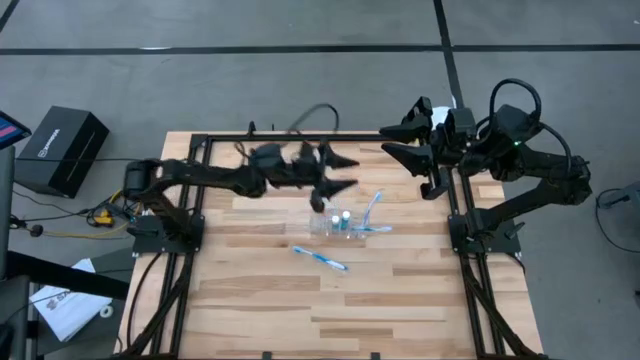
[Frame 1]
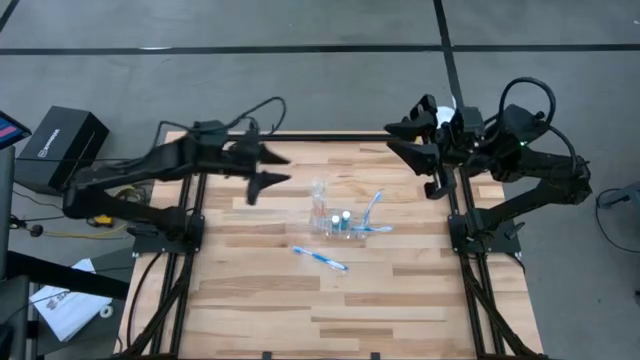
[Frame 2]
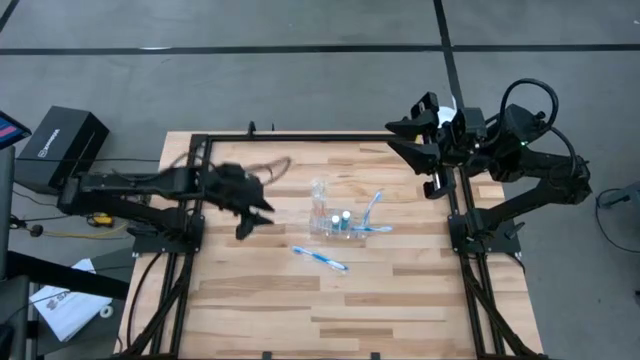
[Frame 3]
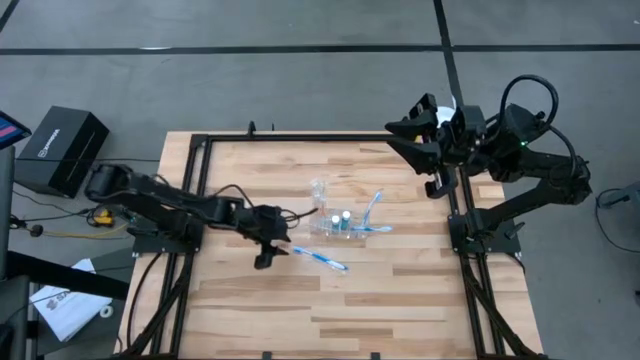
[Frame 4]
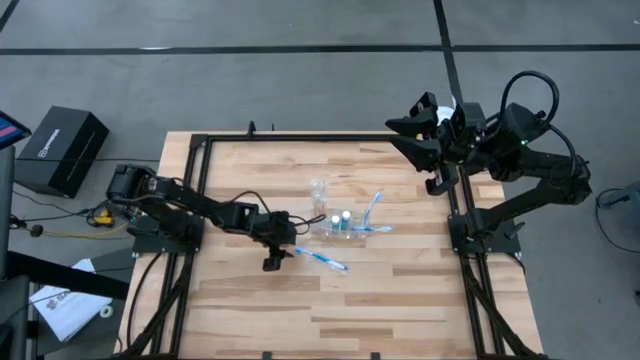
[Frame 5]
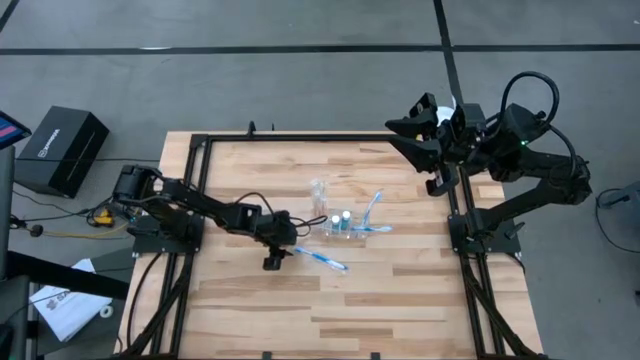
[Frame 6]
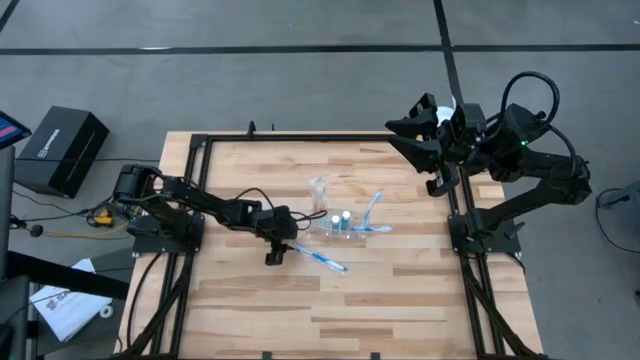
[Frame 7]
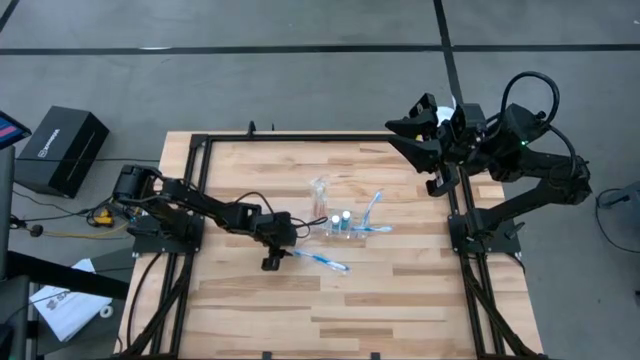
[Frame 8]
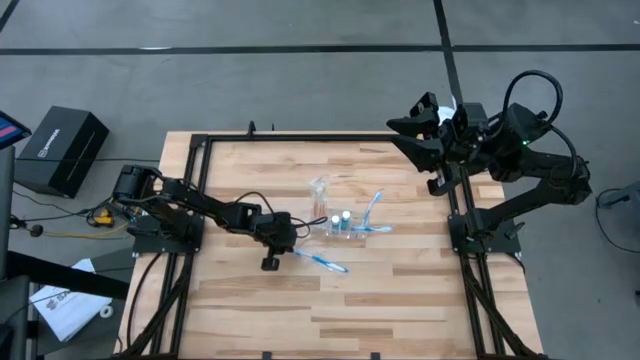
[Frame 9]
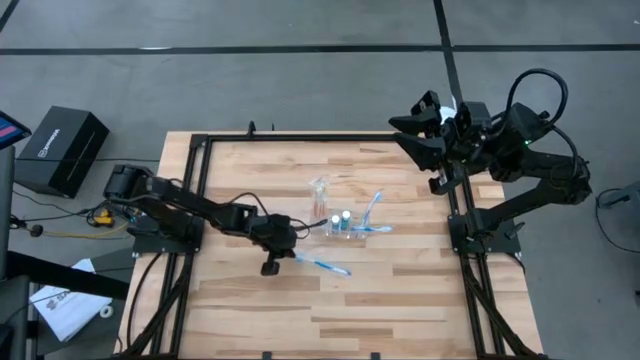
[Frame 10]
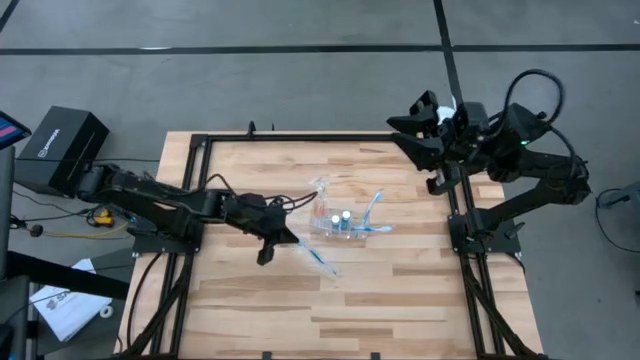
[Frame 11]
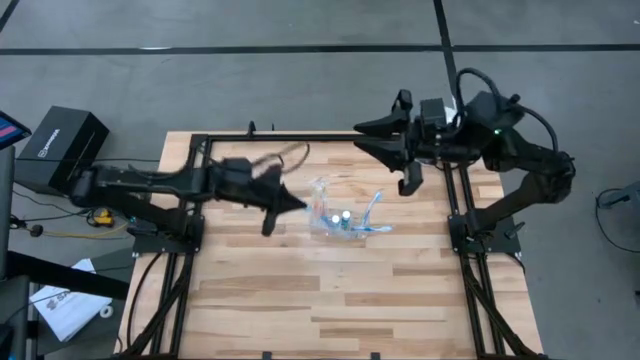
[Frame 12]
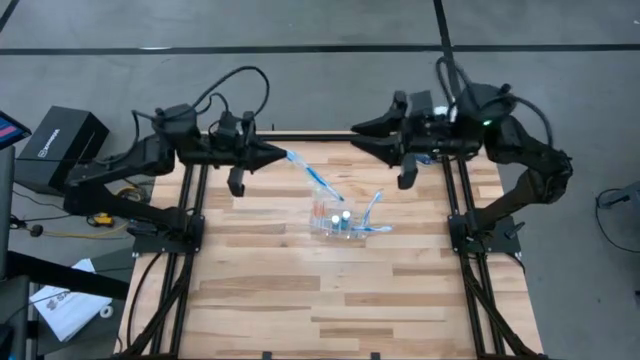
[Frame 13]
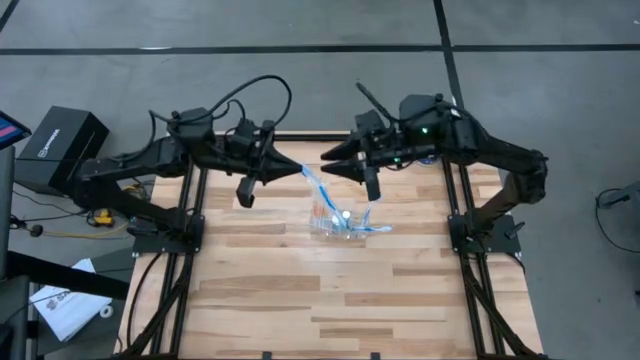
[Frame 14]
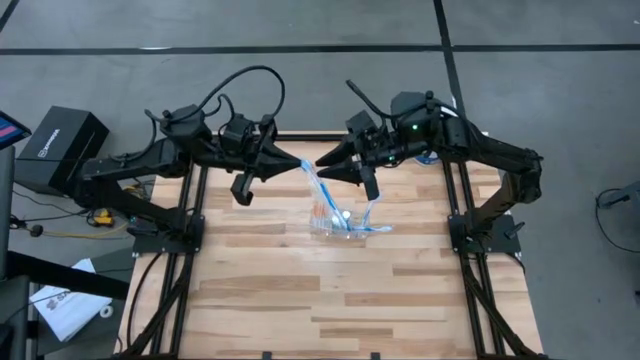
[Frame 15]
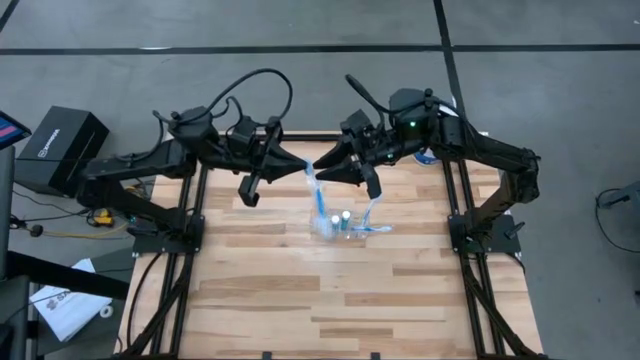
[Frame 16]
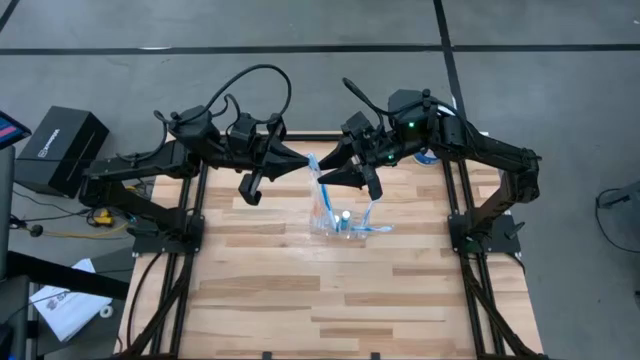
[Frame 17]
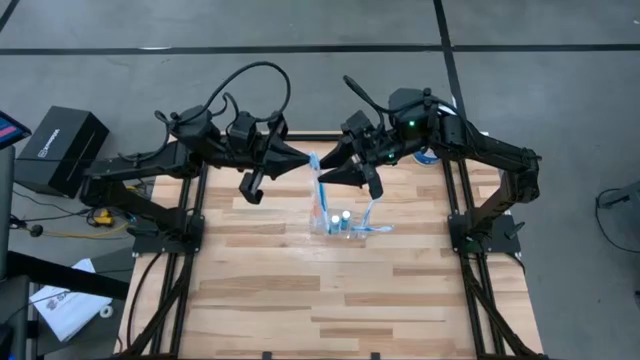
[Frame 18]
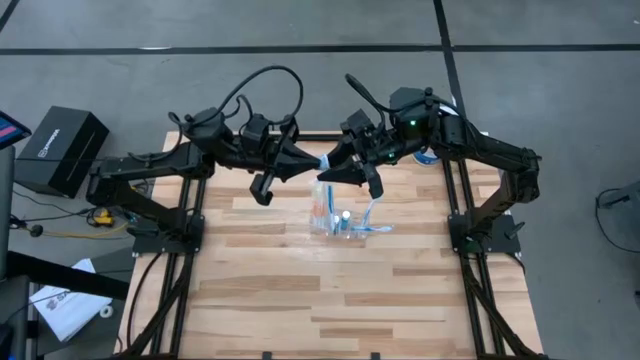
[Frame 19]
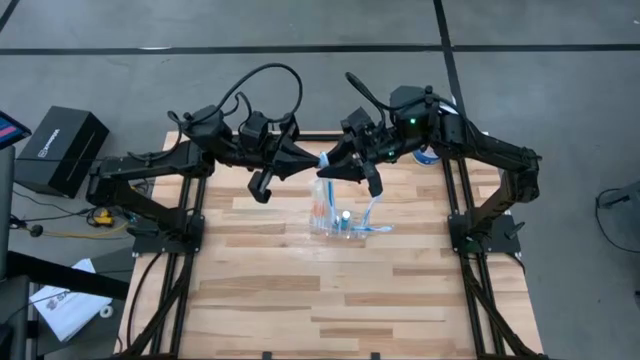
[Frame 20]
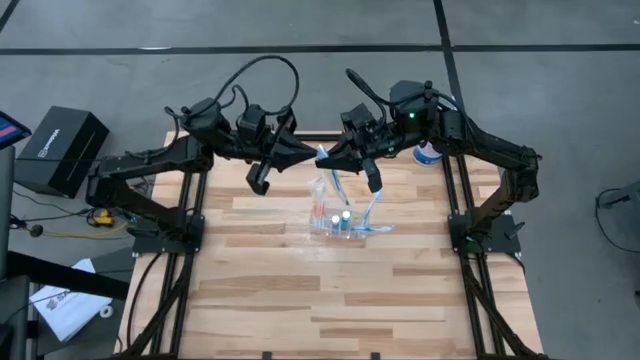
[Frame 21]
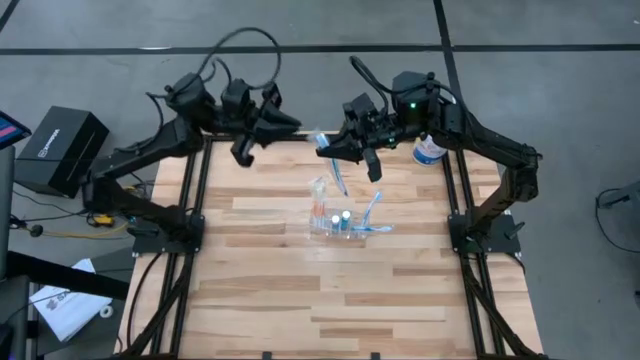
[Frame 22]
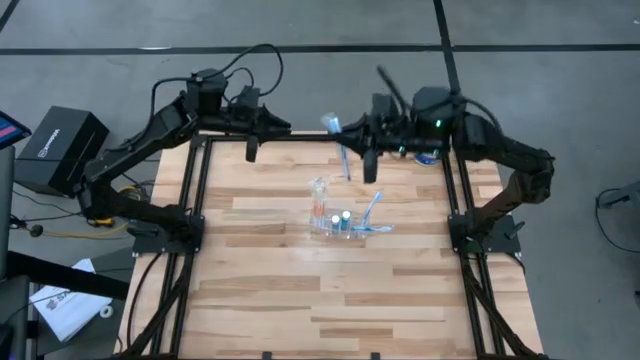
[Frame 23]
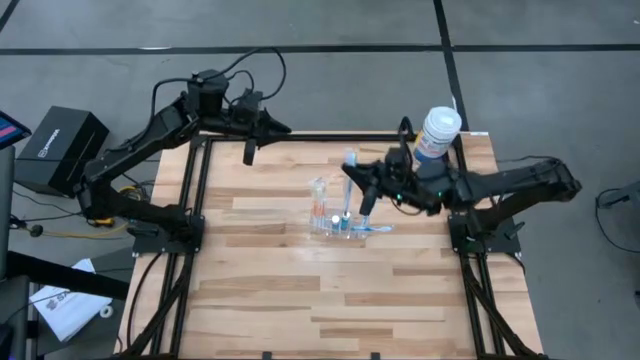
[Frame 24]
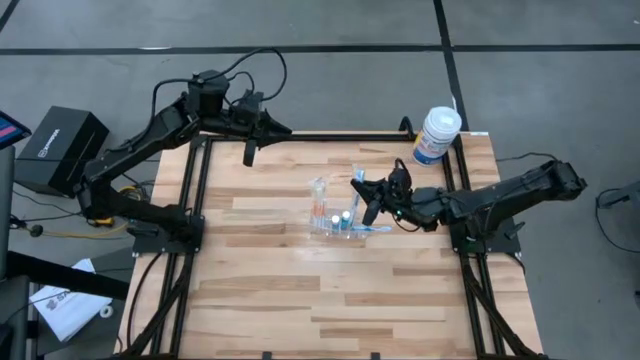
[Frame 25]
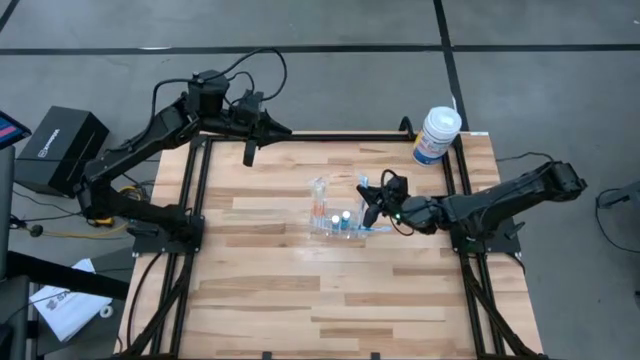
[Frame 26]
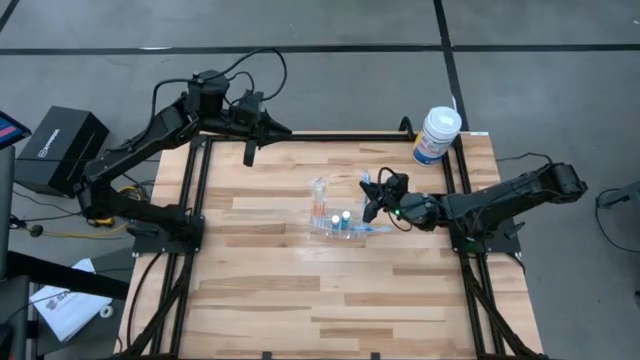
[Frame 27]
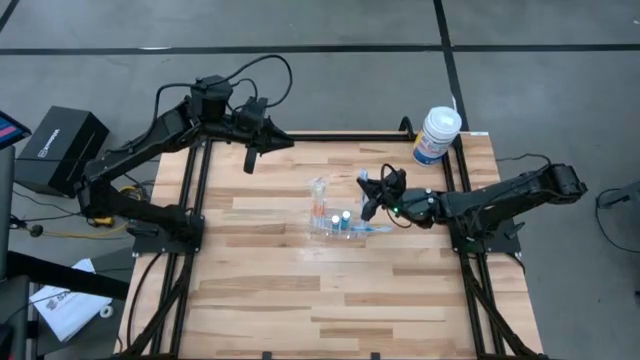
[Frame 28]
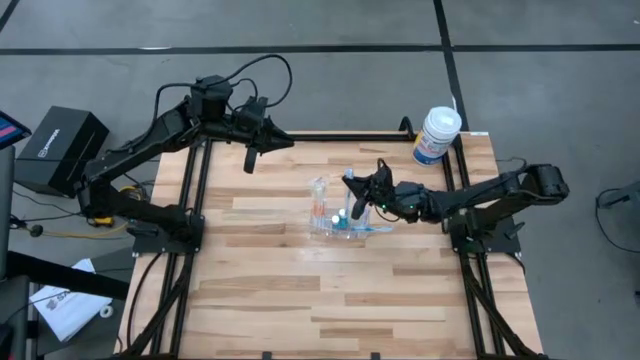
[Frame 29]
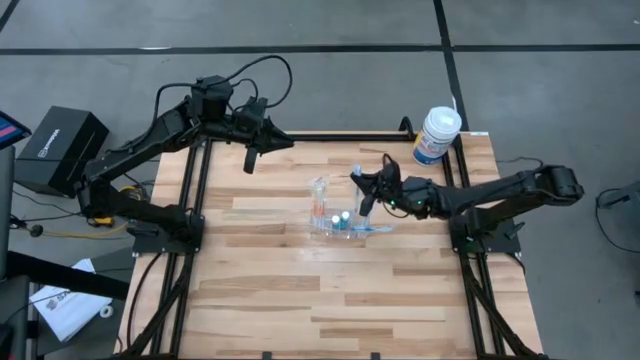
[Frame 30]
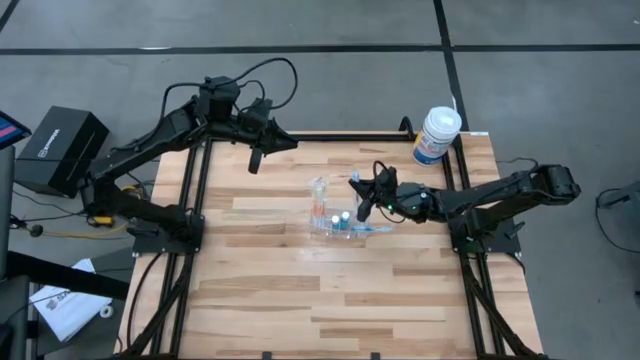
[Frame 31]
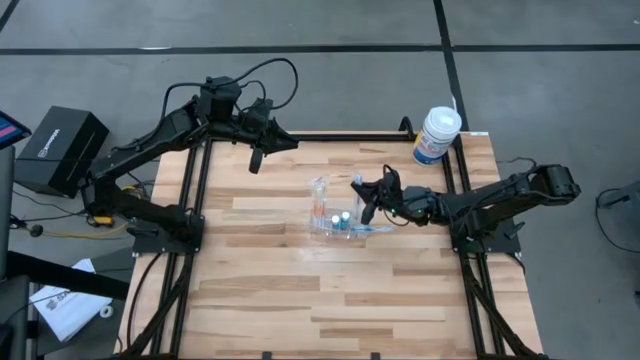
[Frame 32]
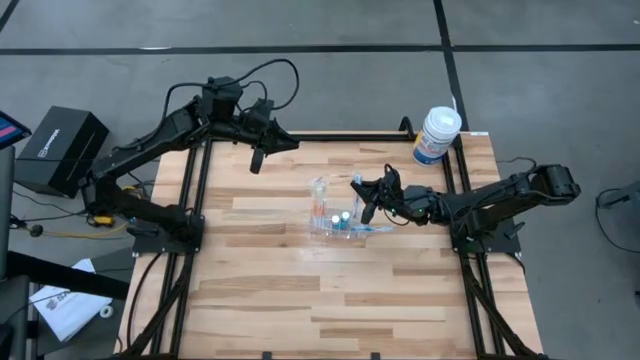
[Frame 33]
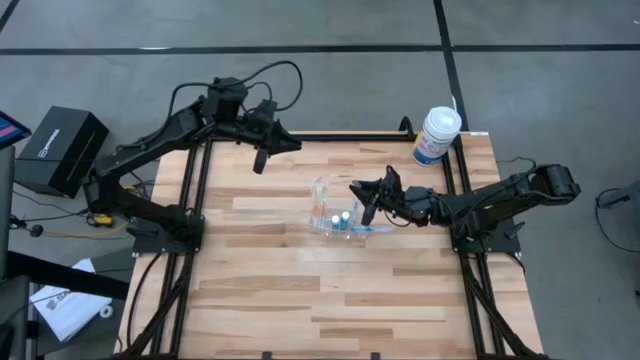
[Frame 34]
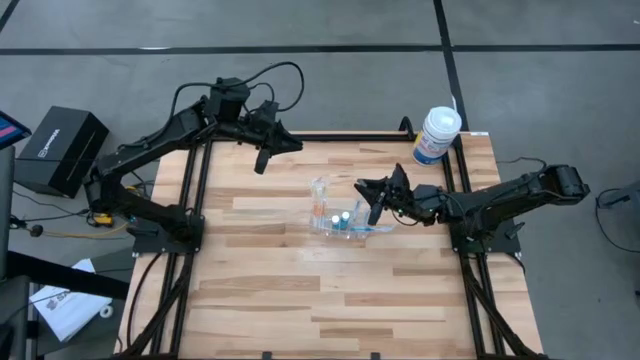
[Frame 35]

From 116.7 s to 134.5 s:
Task: Pick & Place toothbrushing station
Put the blue toothbrush into the transparent organizer

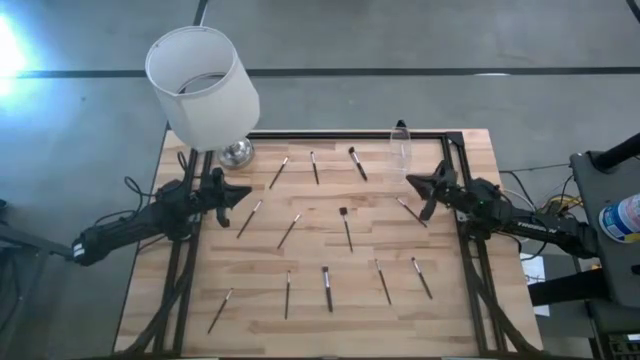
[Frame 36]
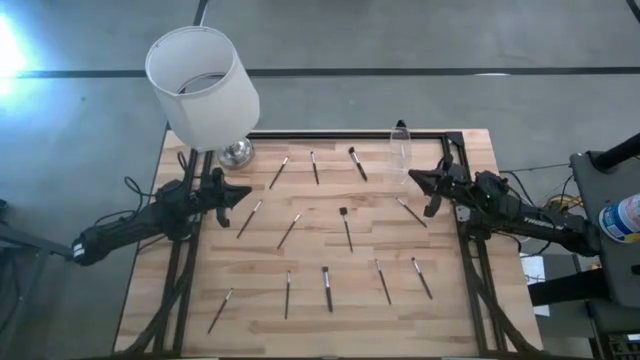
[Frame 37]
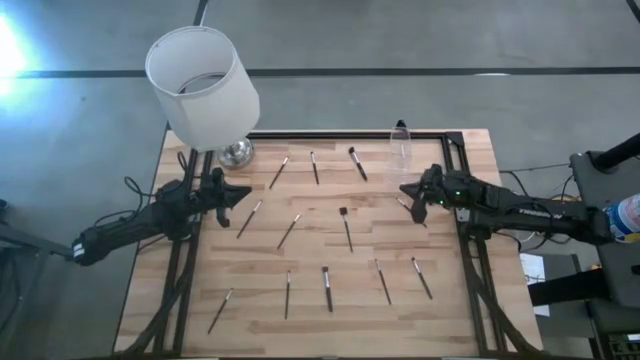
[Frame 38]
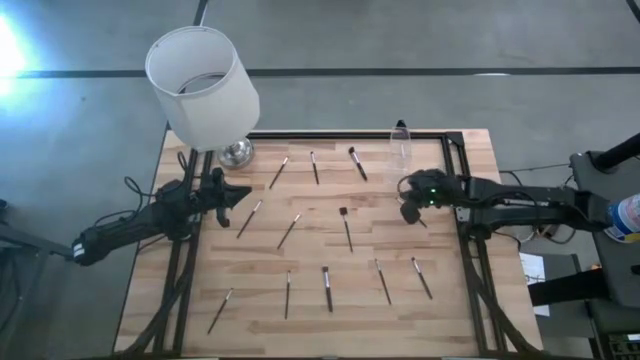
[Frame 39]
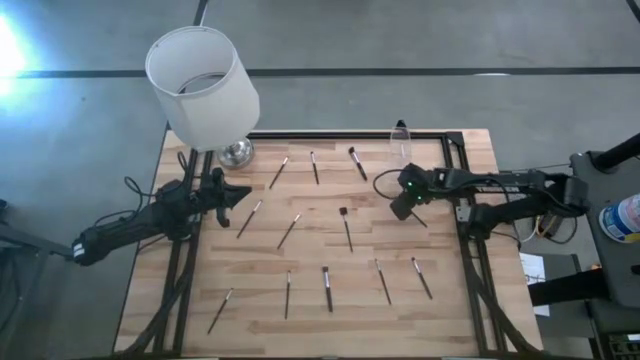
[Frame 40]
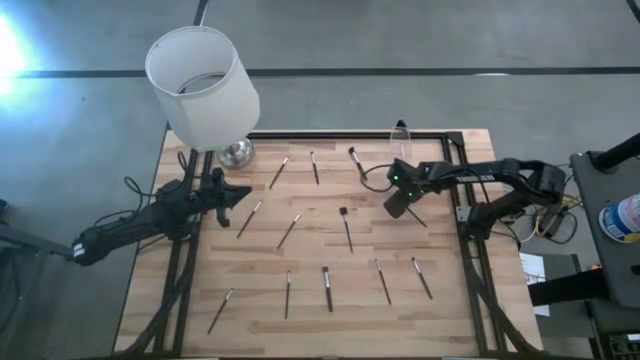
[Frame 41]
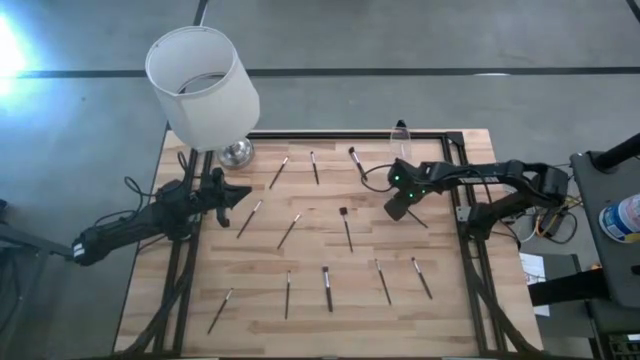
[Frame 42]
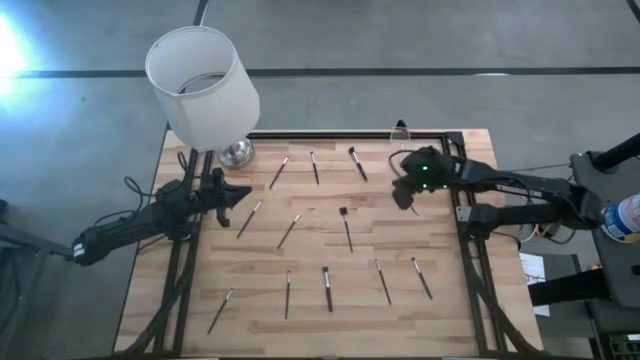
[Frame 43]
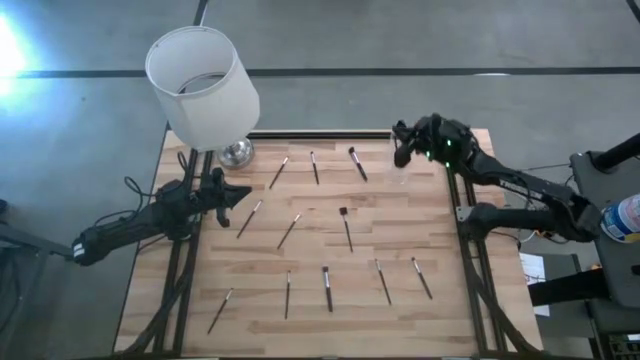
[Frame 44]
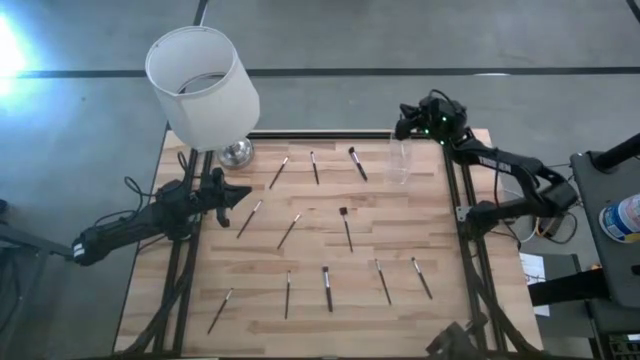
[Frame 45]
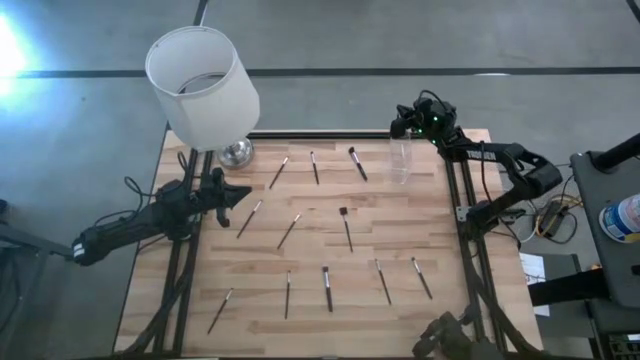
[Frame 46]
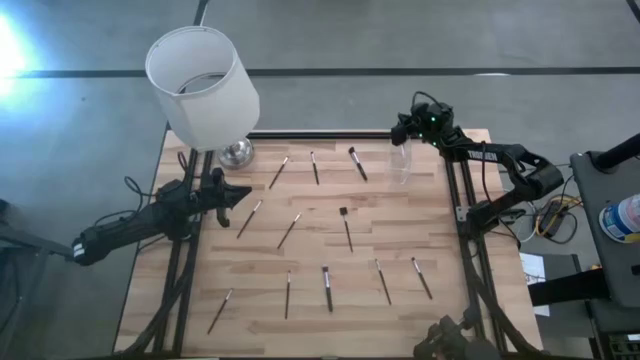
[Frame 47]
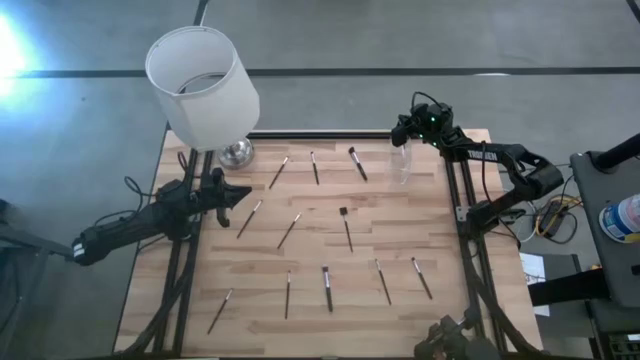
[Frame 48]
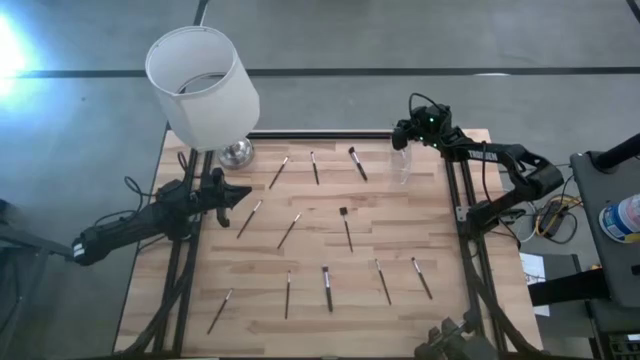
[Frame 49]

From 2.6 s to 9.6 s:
Task: Put items in baskets/containers
Put the eyeshadow brush into the transparent organizer
